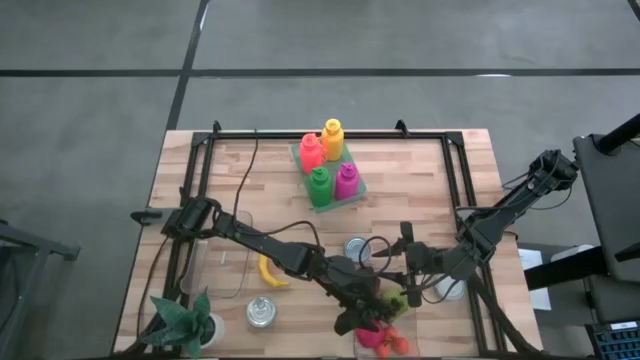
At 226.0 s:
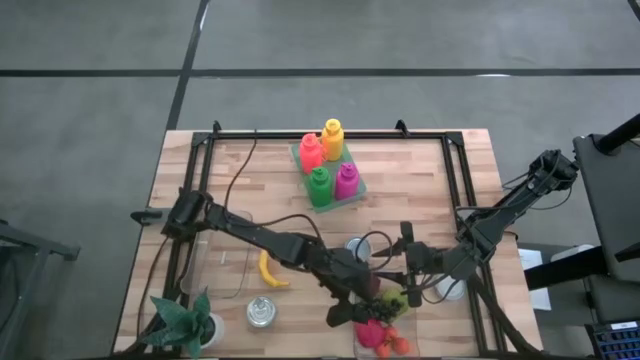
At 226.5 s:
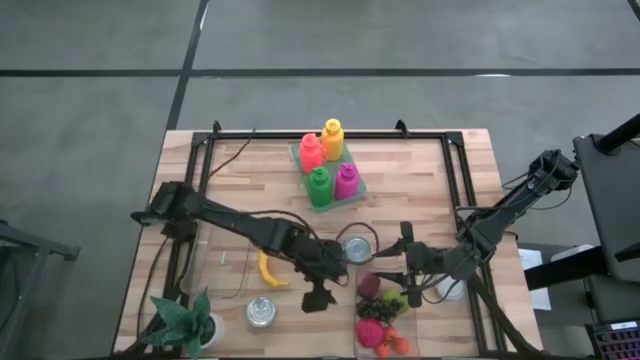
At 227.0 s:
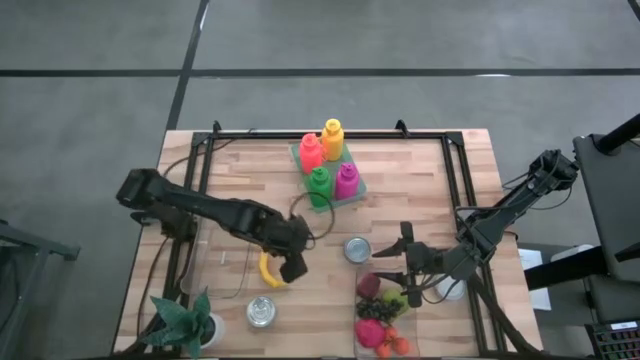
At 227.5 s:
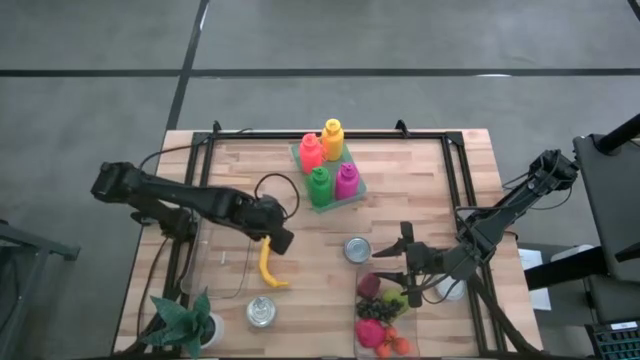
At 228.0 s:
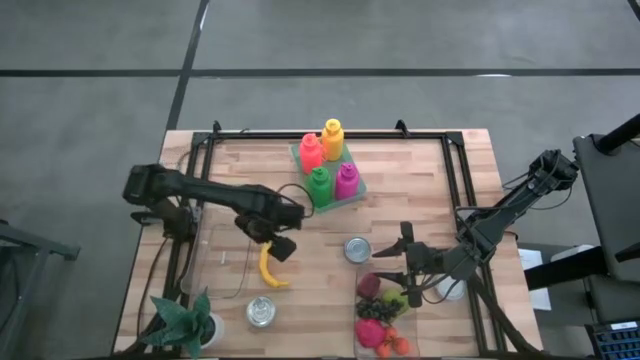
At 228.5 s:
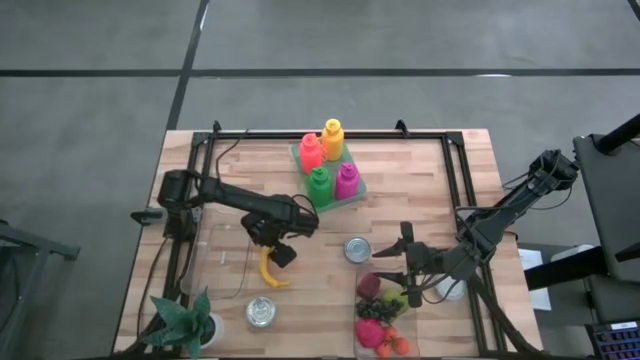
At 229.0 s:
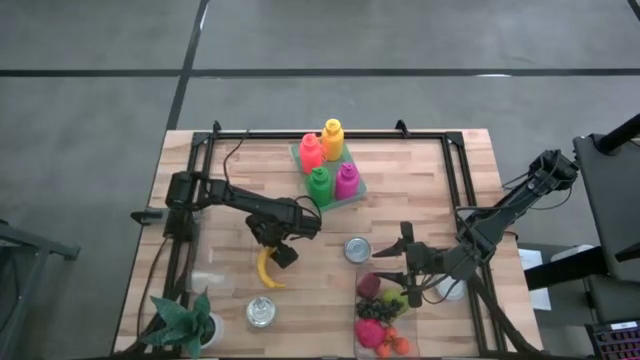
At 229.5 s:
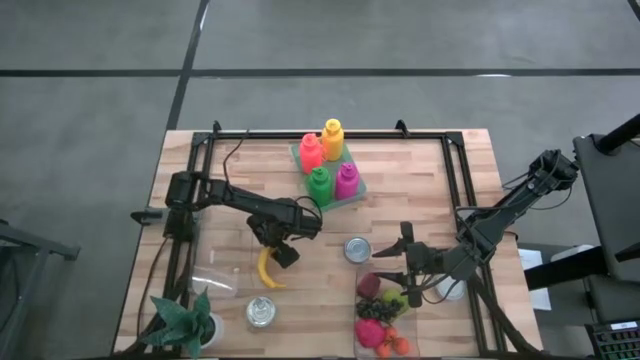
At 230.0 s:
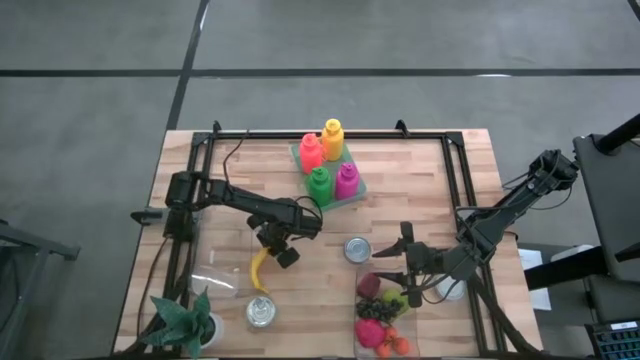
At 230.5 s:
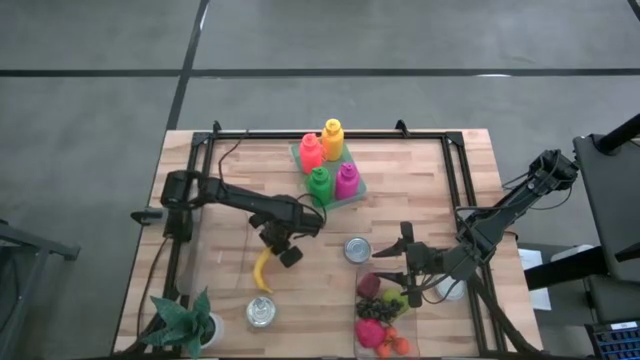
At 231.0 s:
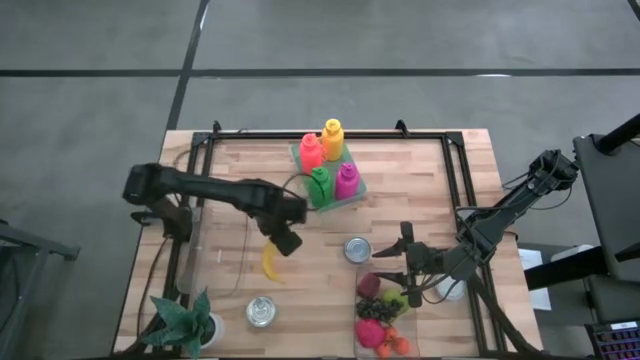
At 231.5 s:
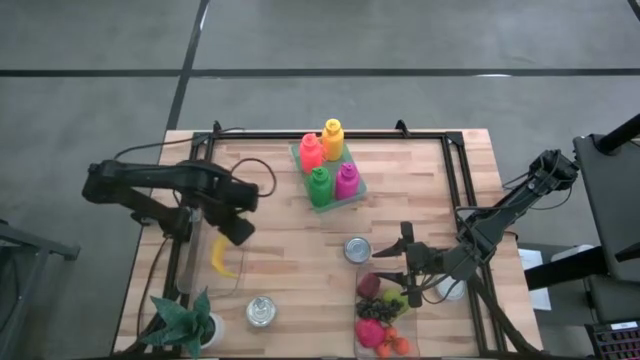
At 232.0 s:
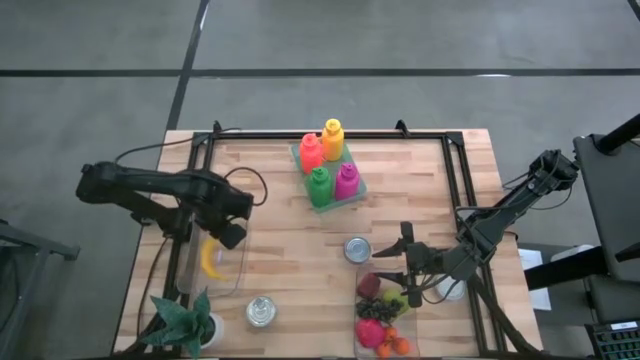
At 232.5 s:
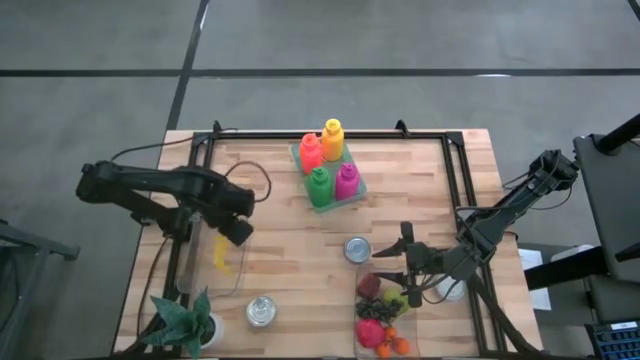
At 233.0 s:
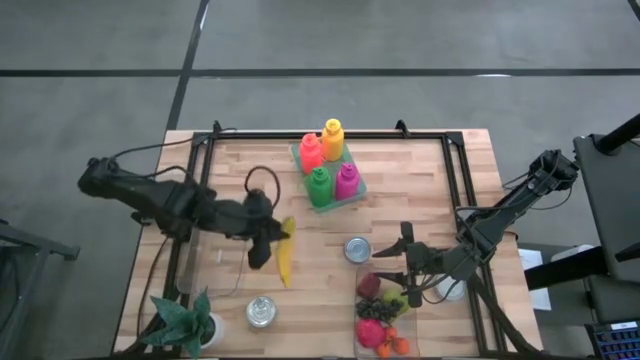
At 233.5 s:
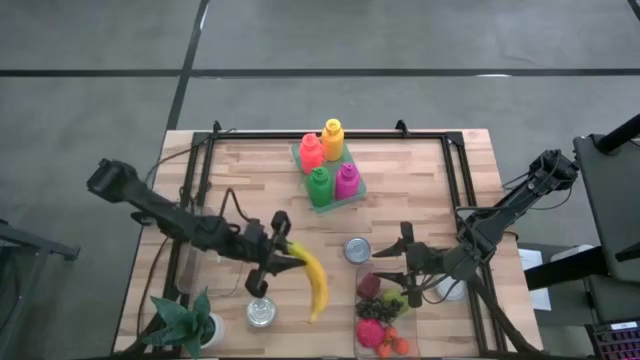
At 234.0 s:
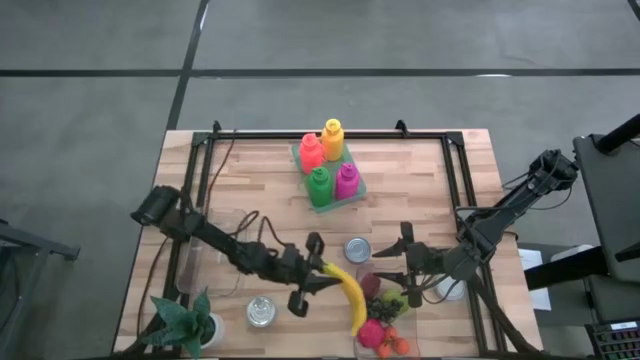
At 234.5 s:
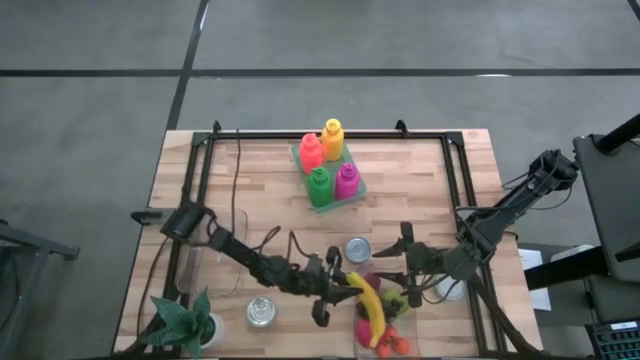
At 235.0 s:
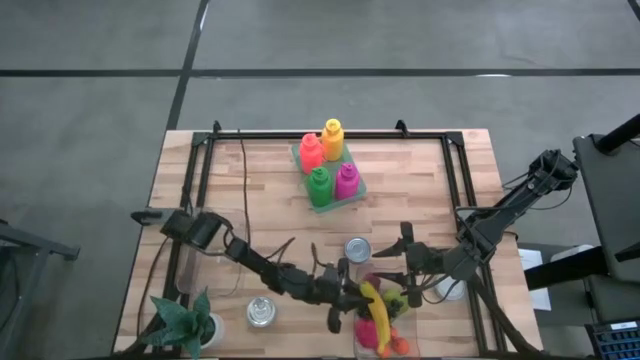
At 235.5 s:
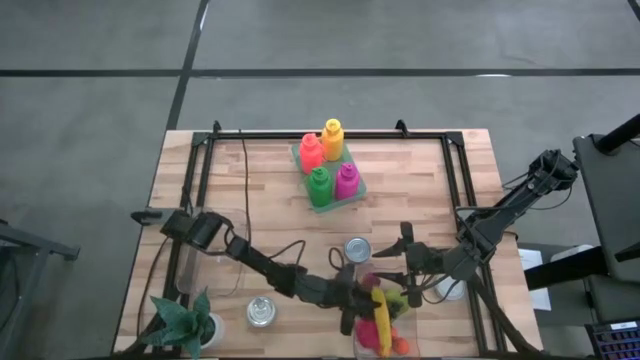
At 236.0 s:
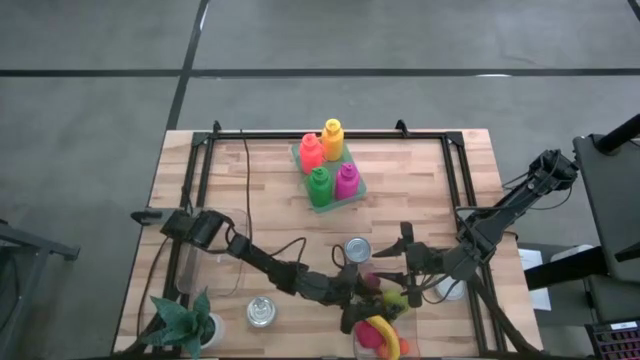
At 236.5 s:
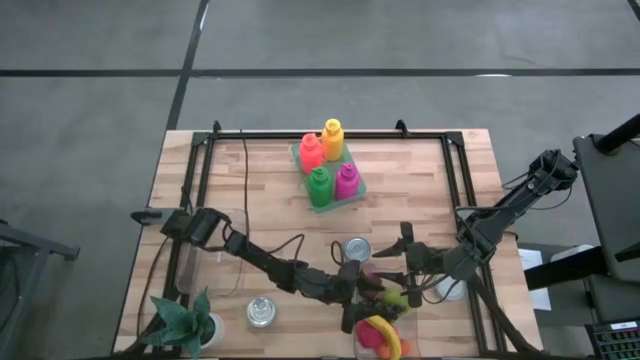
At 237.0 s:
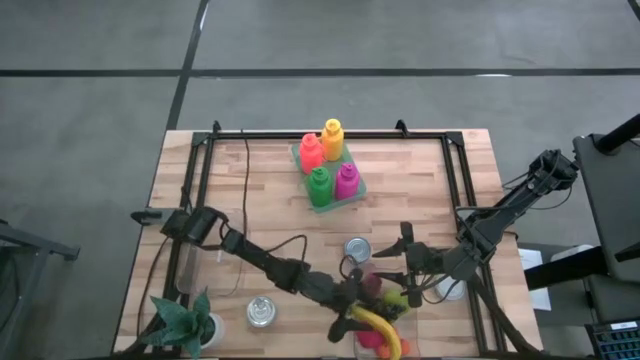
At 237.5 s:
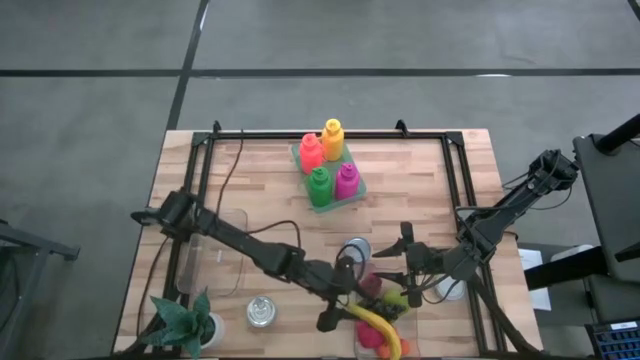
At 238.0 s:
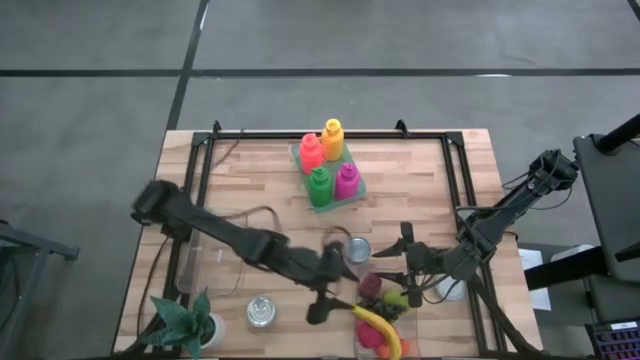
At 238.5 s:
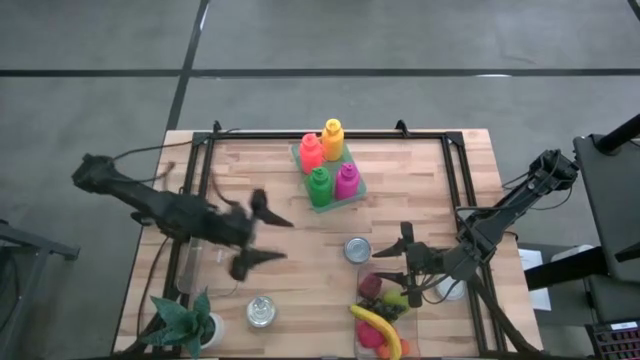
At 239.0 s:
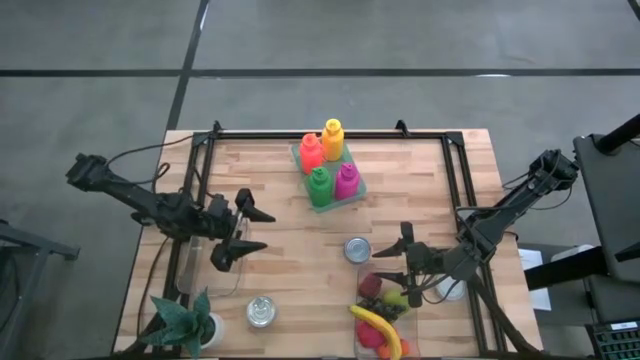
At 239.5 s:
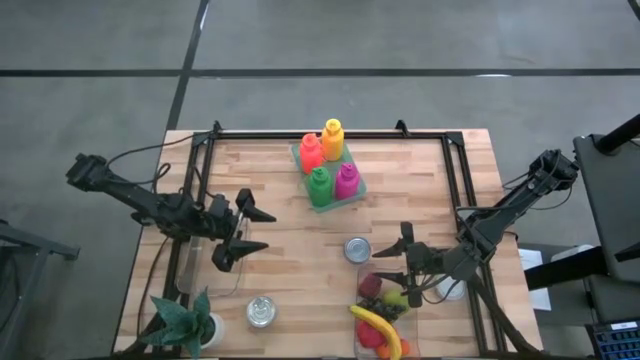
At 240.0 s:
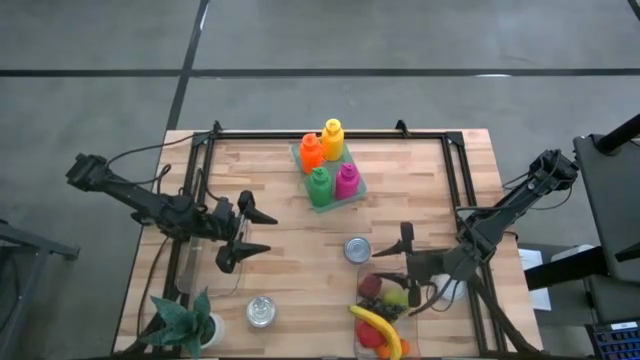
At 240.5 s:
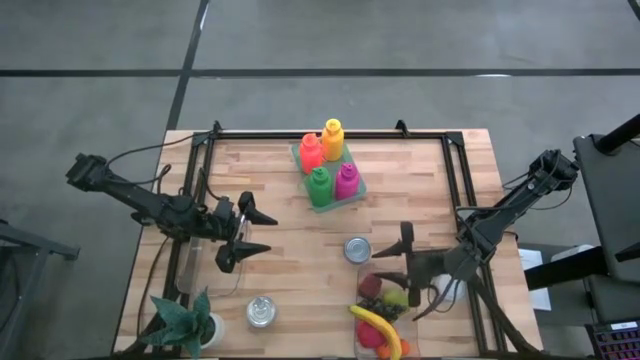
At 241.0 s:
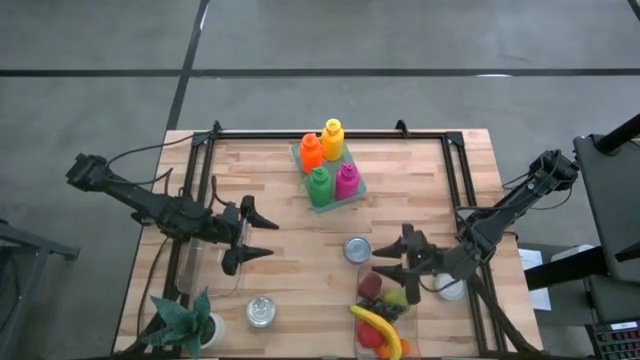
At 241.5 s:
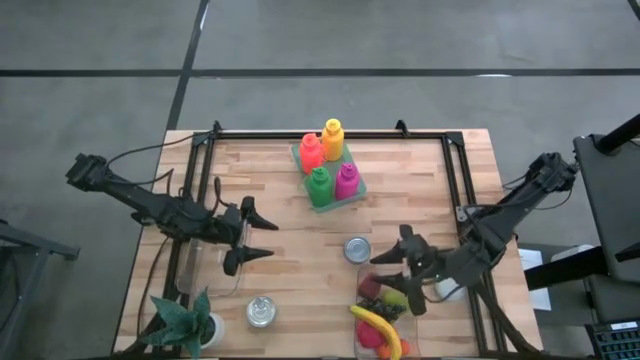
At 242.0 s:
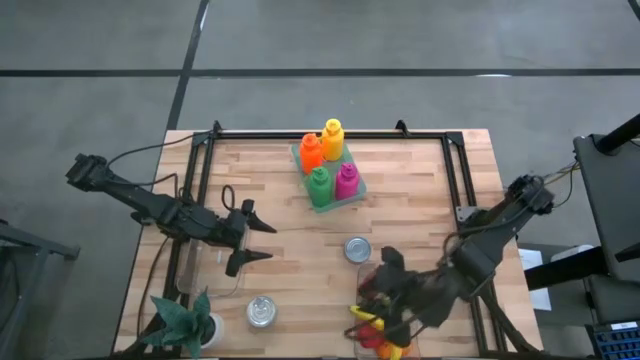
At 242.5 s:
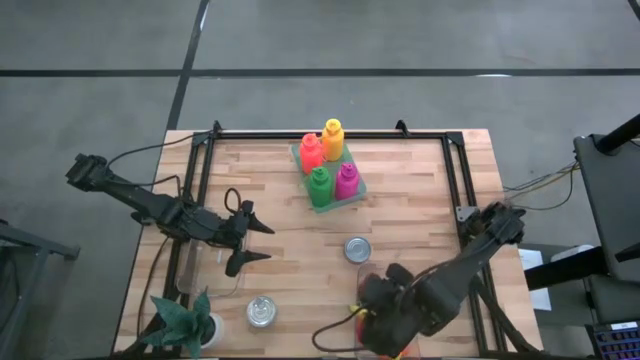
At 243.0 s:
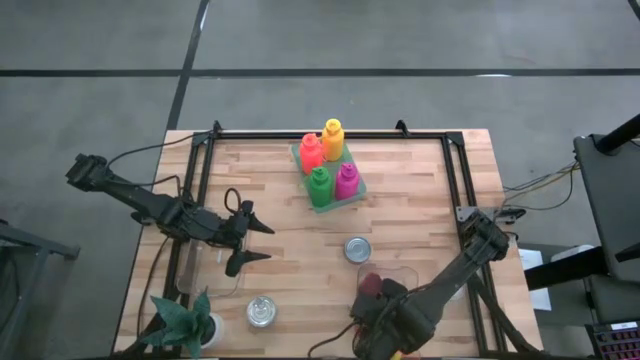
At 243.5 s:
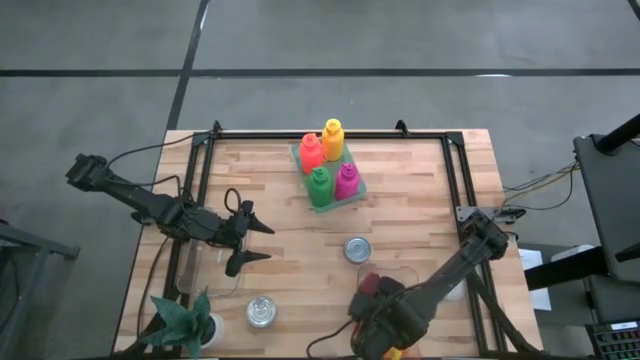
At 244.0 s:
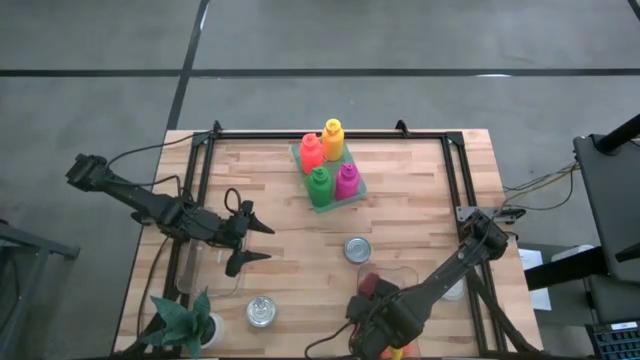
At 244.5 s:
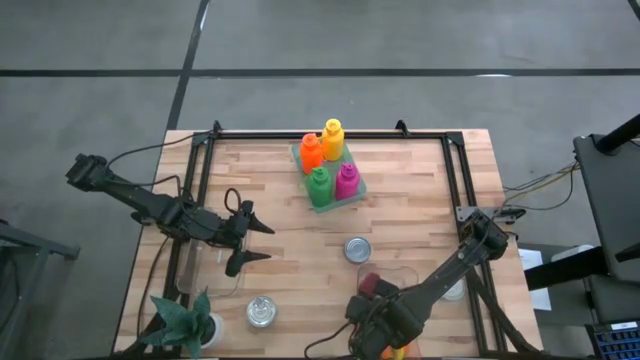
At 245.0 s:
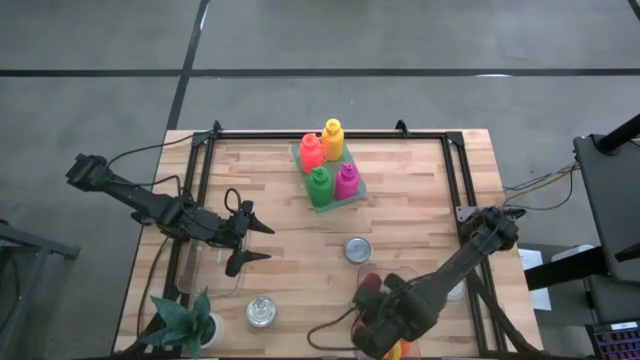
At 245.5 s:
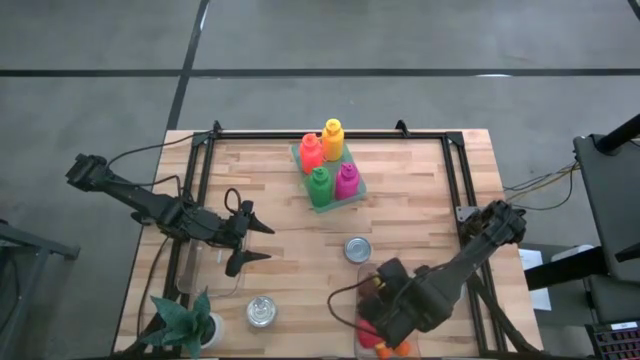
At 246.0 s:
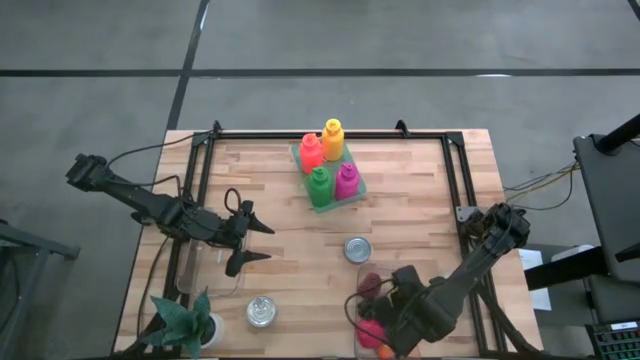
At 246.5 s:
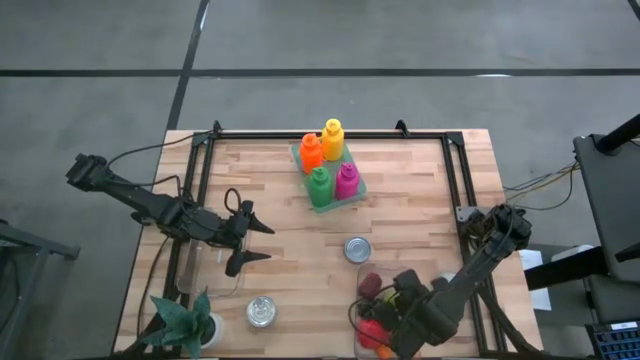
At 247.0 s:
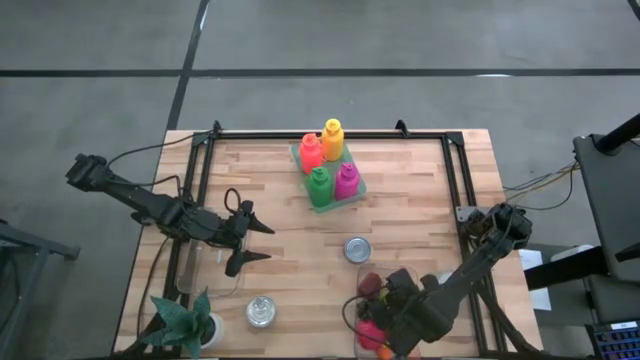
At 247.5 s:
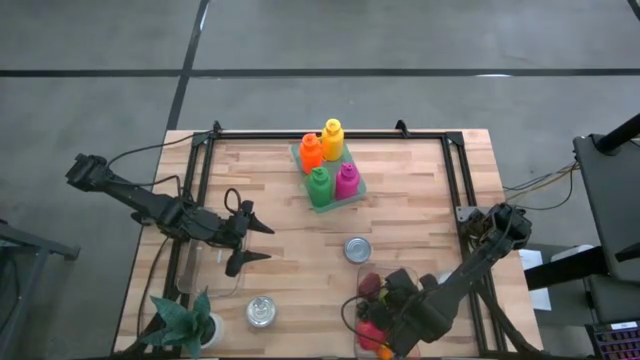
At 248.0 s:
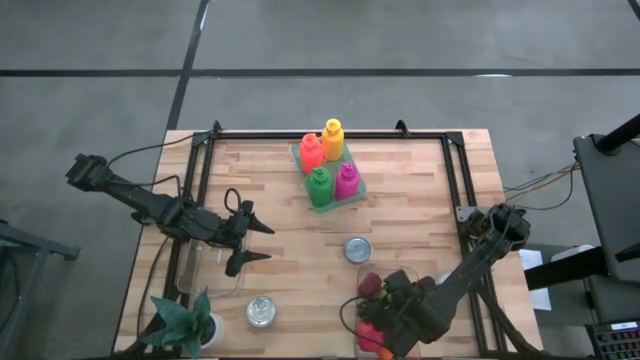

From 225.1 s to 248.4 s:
Task: Pick & Place Food Item
Put the yellow banana into the bottom transparent bin
